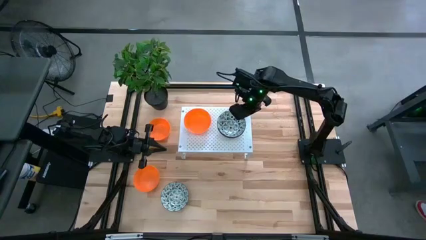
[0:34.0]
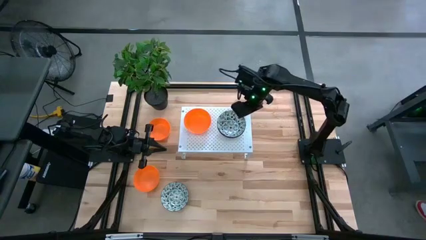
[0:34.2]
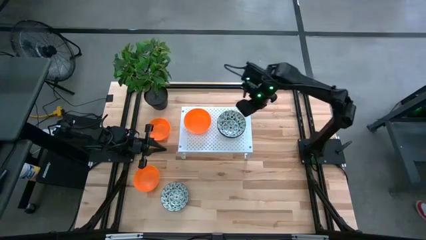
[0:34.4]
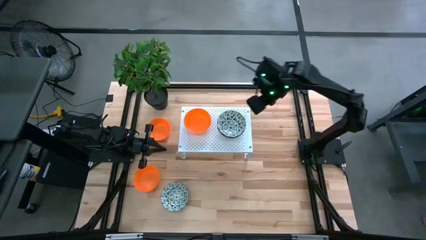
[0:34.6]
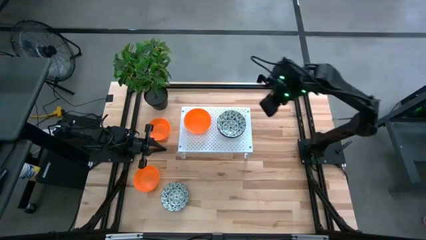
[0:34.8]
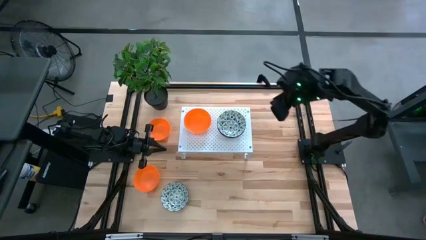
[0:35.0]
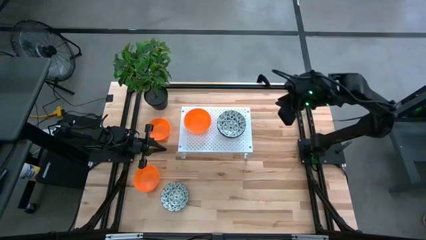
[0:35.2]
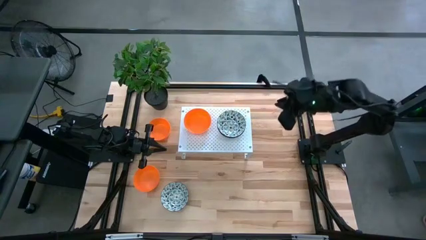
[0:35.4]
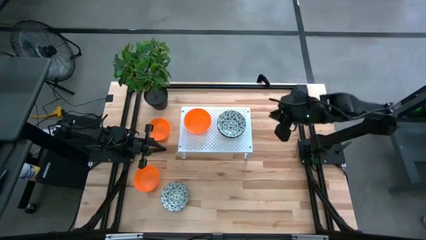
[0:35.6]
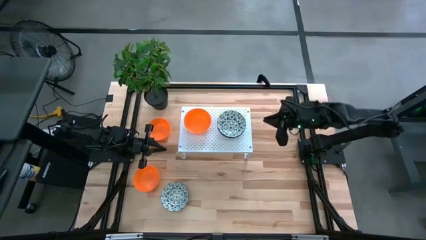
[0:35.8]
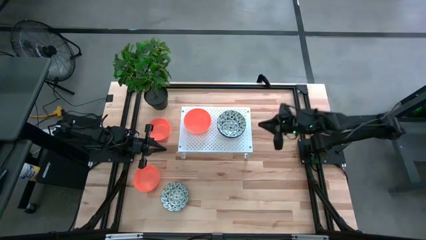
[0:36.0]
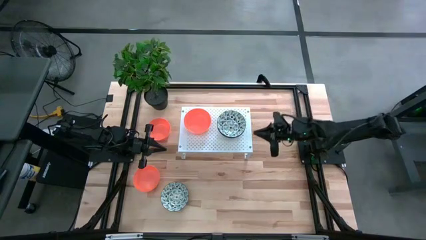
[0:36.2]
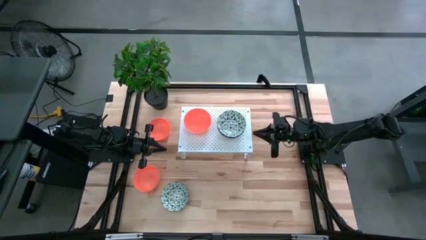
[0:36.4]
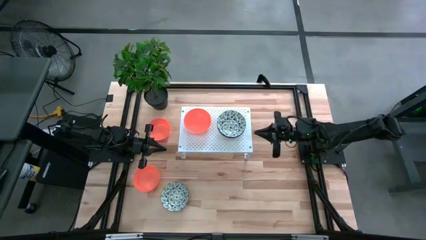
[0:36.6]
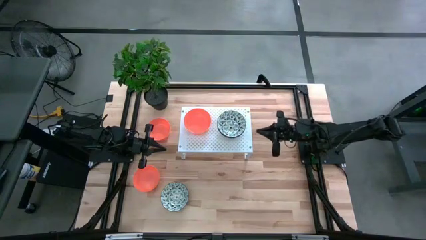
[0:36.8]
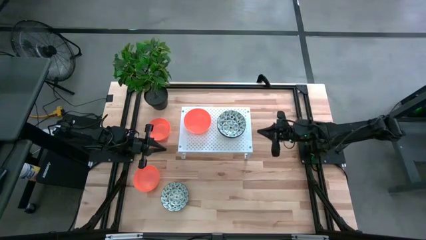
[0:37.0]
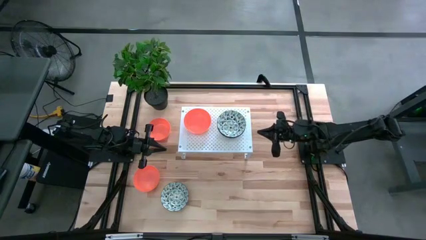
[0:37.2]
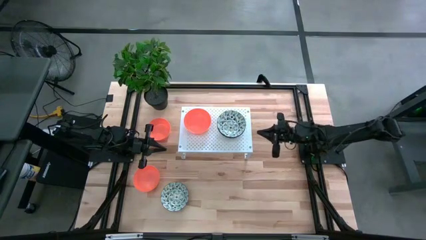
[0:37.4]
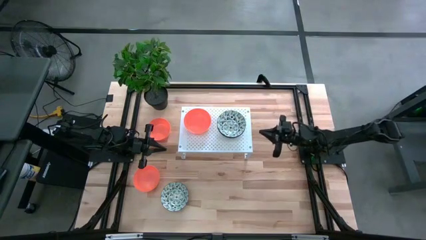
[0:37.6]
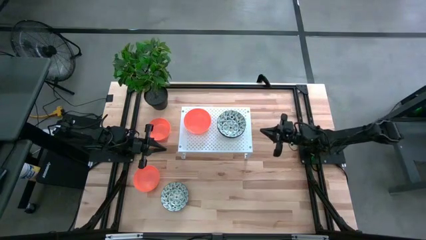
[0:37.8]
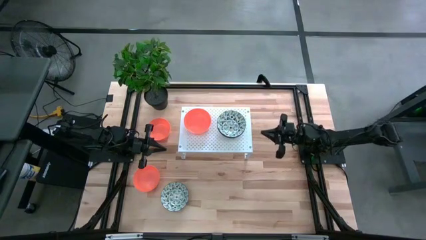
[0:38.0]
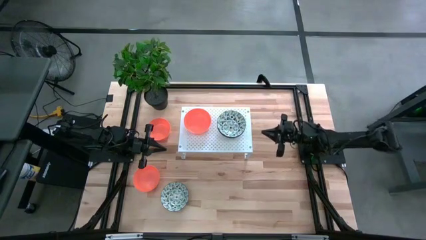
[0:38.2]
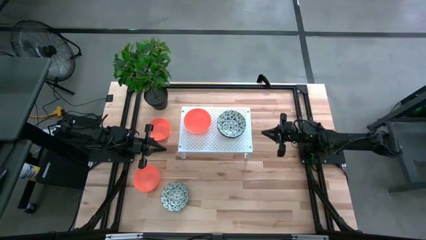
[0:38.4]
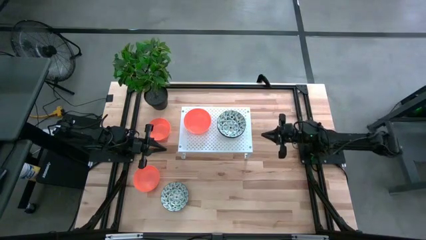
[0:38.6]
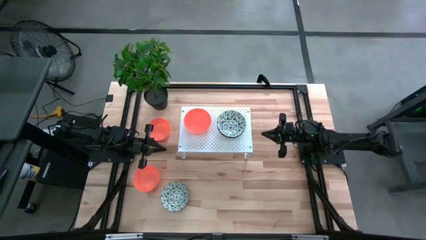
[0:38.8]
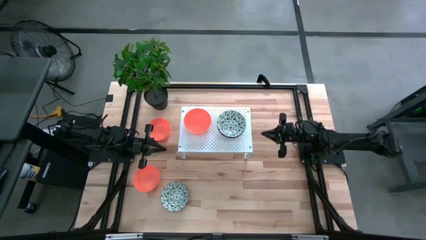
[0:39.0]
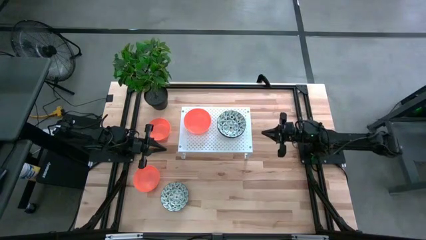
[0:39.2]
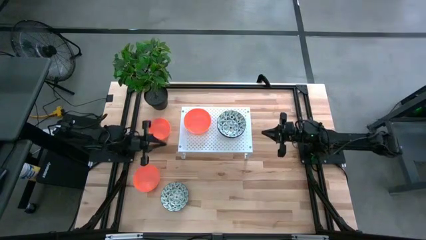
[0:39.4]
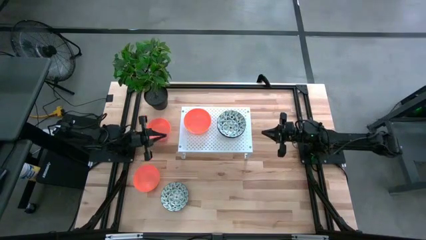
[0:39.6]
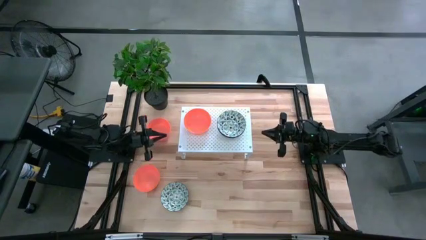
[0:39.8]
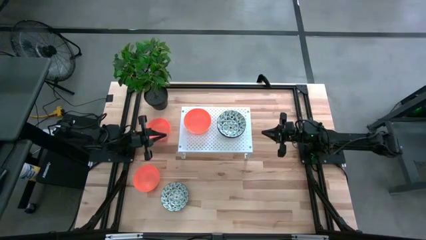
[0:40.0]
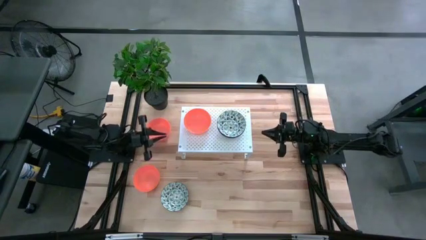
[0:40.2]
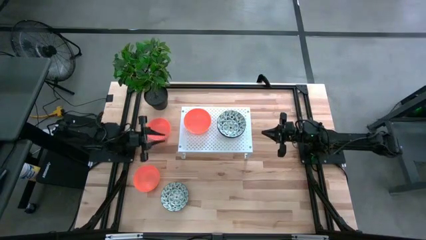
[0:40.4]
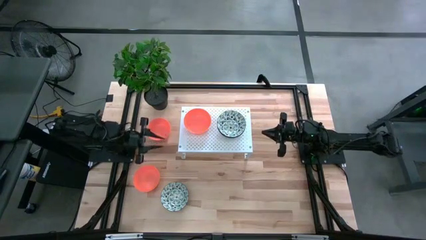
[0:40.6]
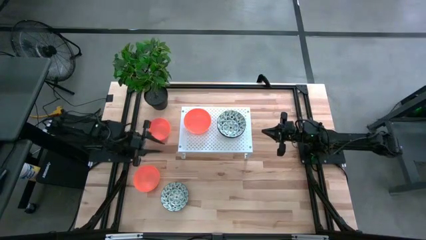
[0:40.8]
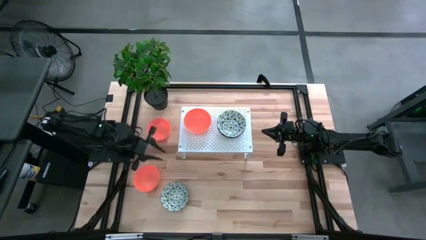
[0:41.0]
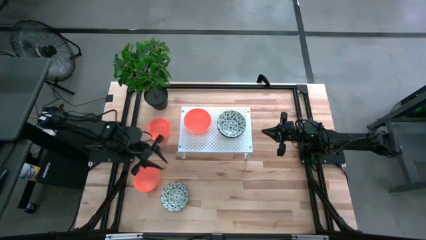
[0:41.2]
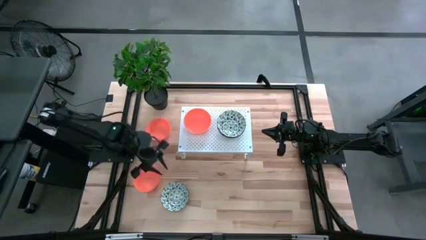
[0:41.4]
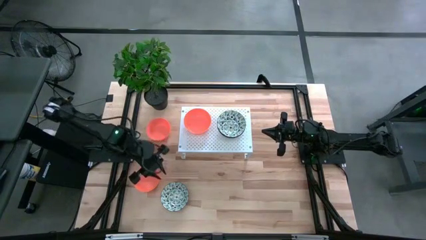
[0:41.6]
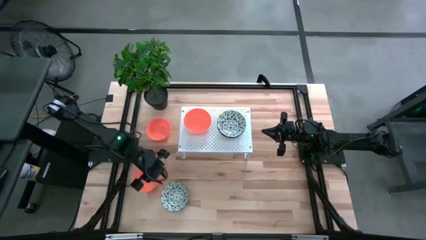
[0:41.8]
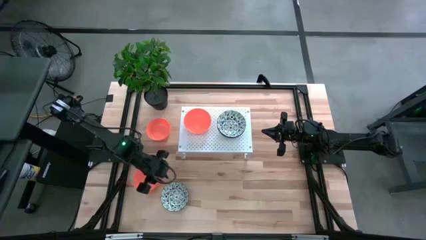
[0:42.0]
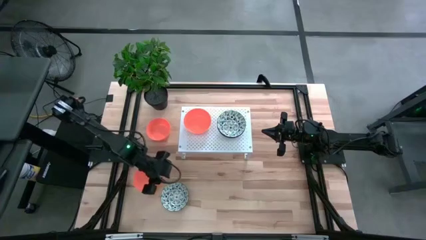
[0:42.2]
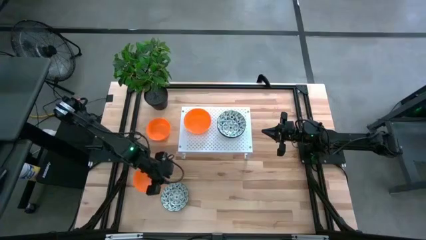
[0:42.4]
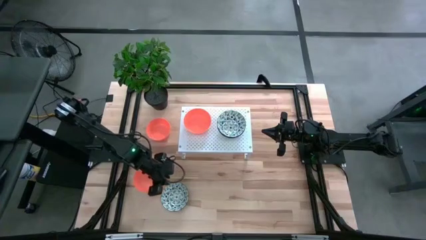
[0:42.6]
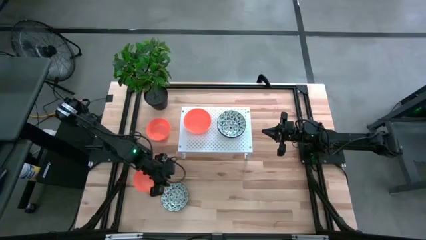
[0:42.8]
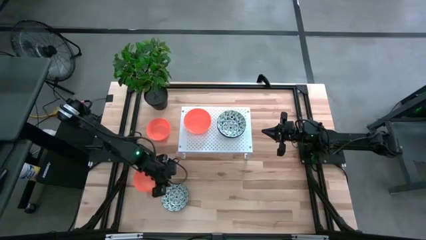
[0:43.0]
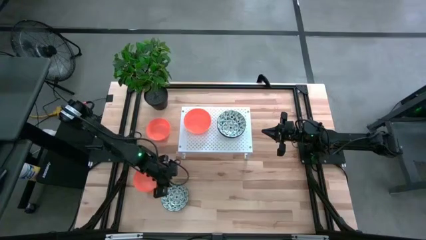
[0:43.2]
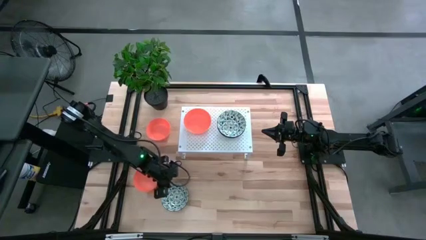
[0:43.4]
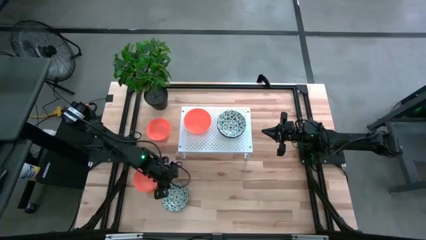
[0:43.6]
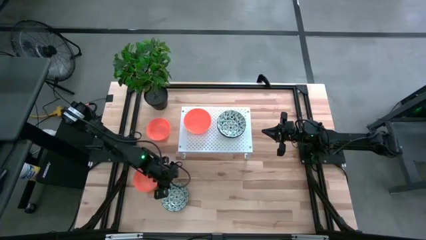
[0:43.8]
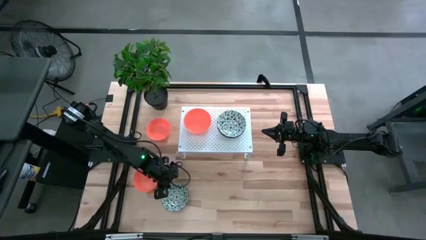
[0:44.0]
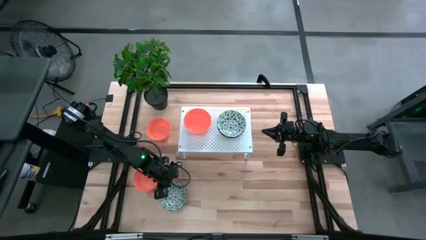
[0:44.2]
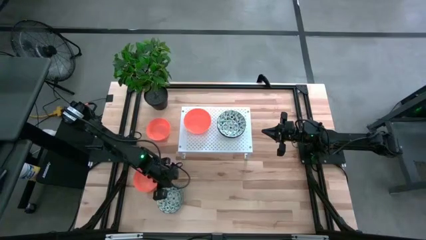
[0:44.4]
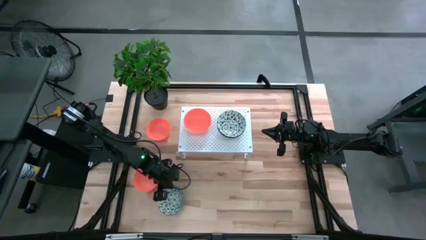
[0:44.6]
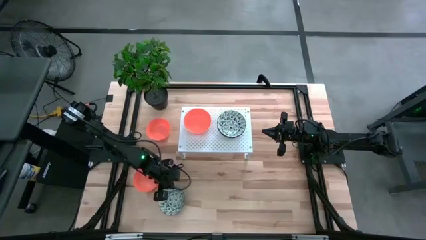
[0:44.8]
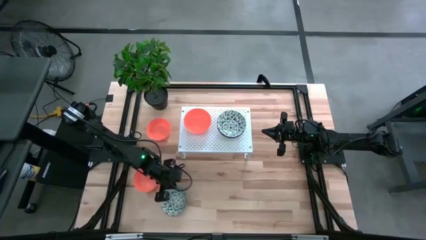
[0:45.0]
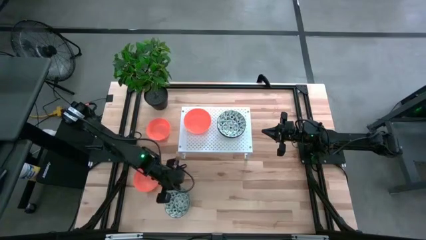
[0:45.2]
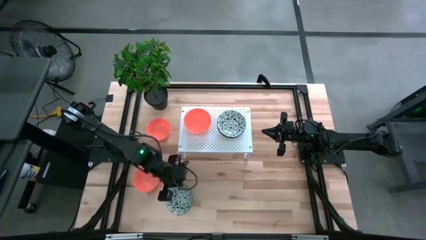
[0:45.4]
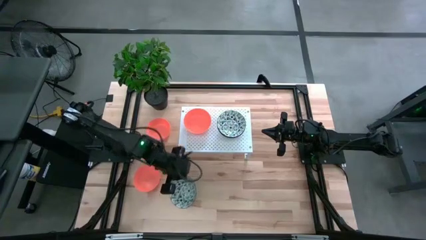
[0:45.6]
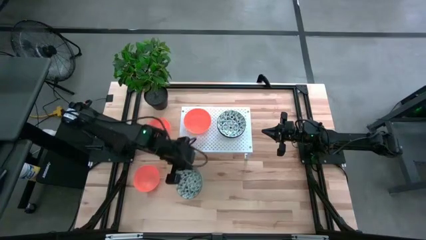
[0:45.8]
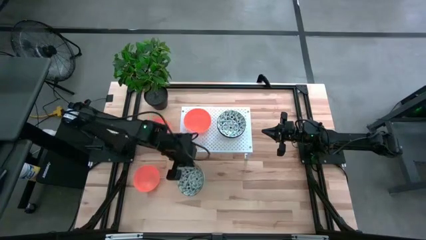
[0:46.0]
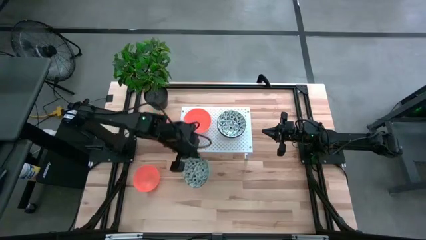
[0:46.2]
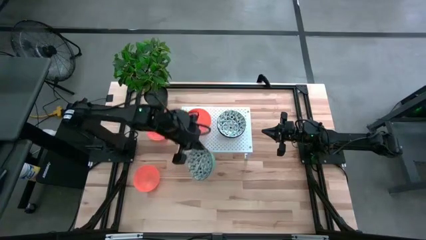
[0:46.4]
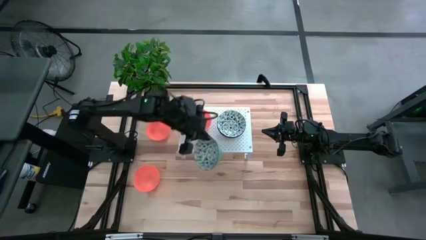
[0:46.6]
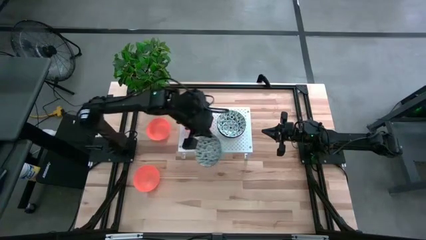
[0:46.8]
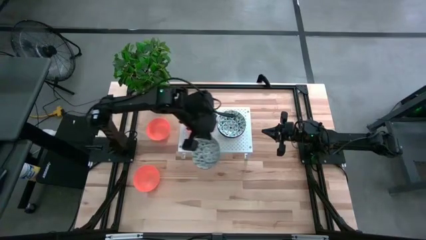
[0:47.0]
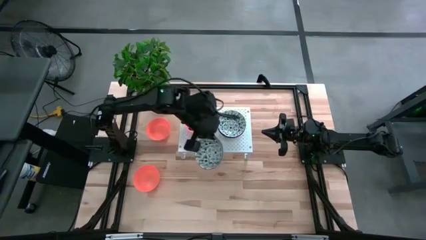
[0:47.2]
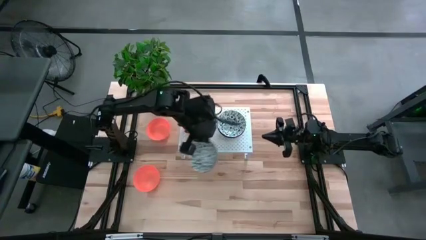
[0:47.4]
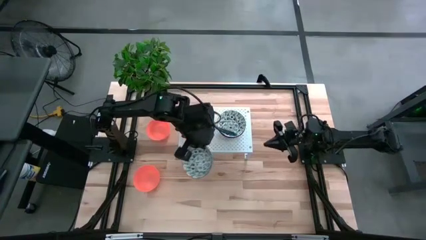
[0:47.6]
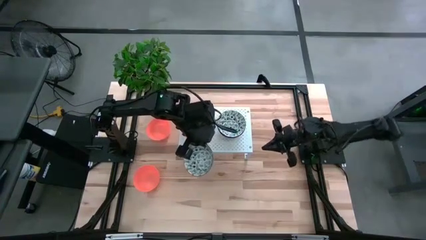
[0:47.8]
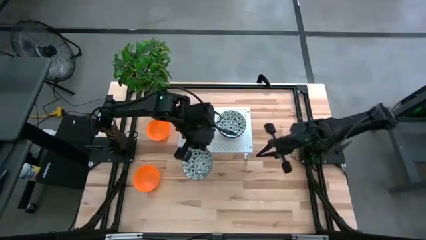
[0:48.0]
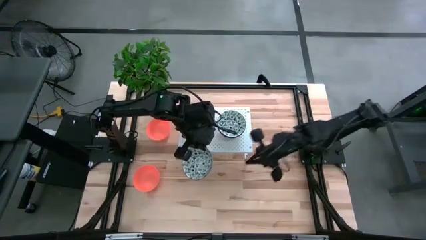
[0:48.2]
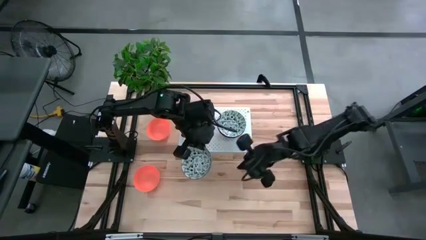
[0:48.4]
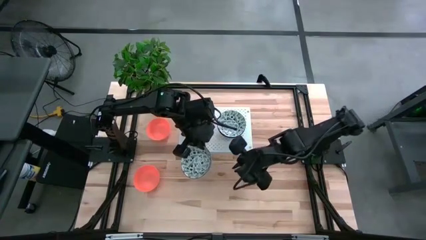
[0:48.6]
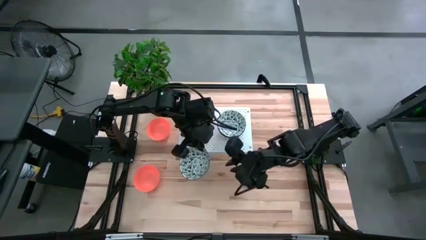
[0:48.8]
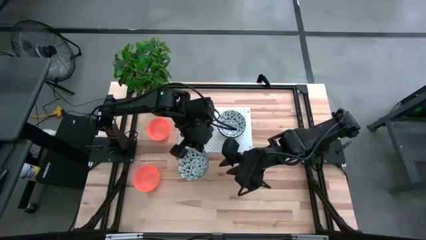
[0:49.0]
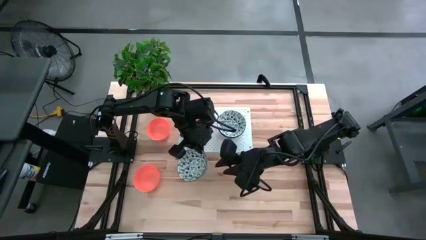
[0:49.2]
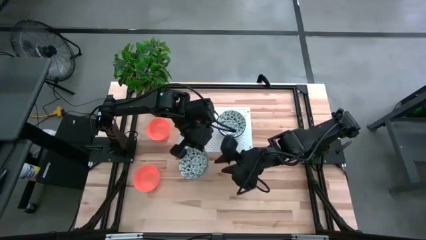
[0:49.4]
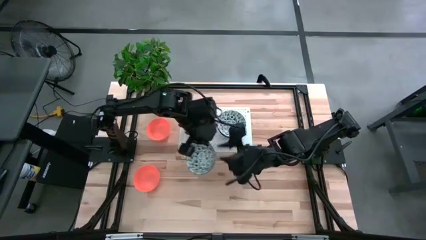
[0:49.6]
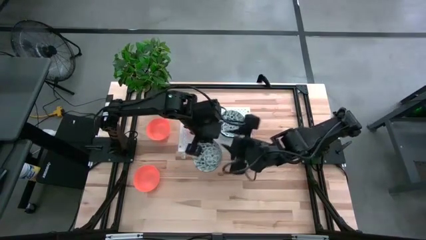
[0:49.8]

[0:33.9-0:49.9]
Task: Pick & Place Mini bowls
Stack the blue patterned bowl on the blue patterned bowls on the shelf
